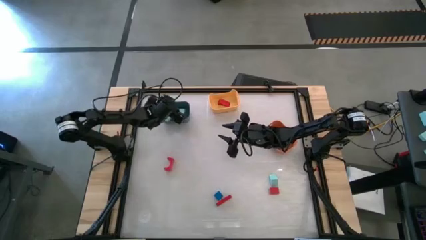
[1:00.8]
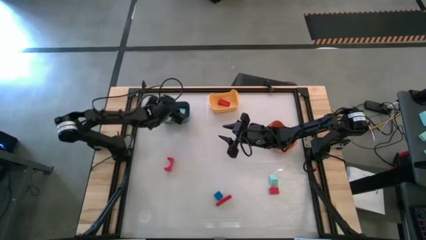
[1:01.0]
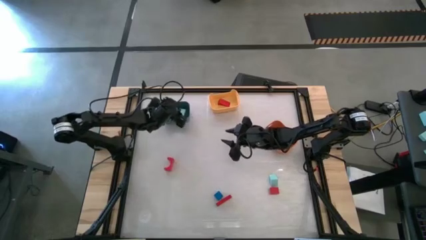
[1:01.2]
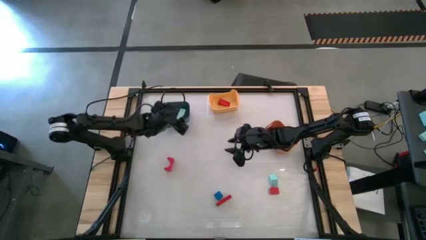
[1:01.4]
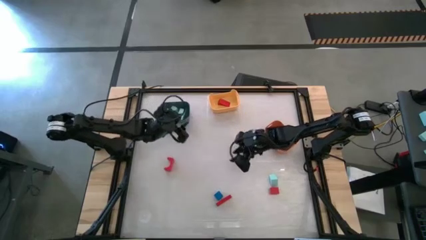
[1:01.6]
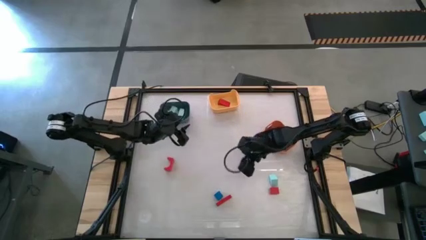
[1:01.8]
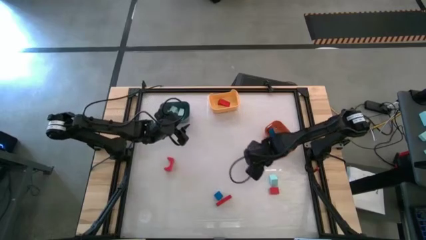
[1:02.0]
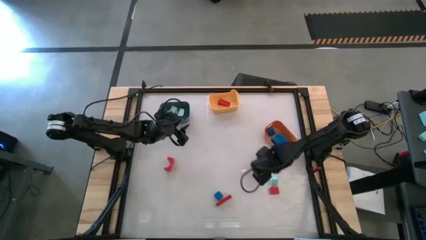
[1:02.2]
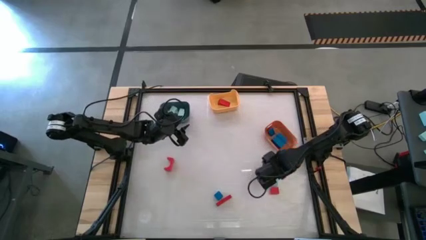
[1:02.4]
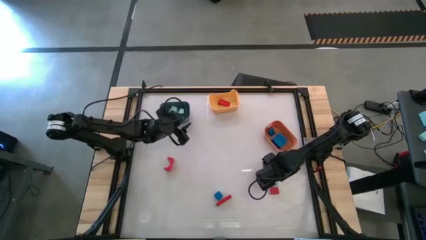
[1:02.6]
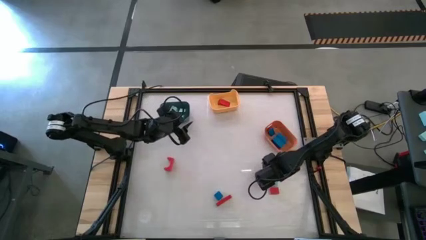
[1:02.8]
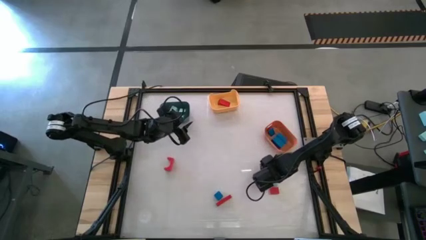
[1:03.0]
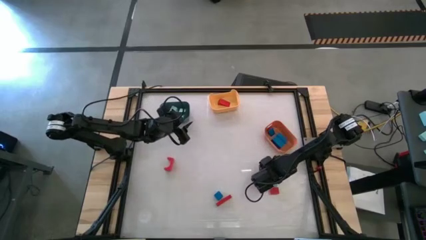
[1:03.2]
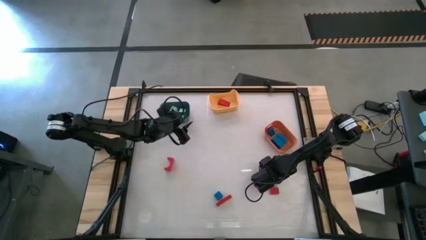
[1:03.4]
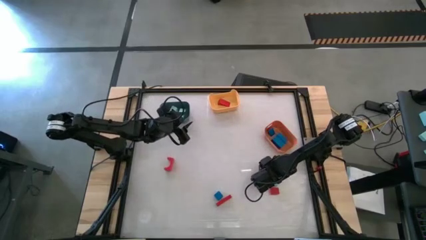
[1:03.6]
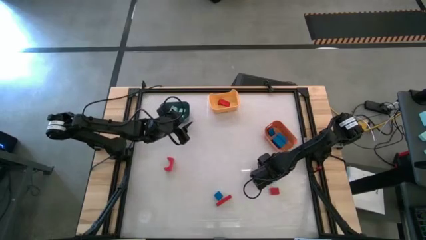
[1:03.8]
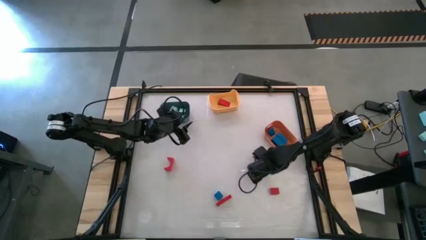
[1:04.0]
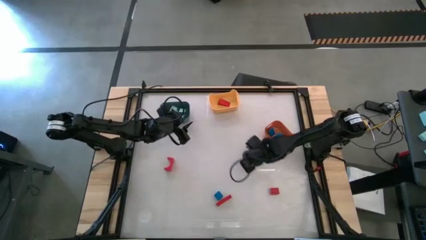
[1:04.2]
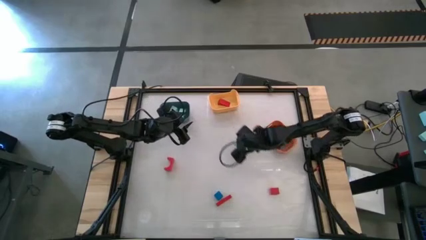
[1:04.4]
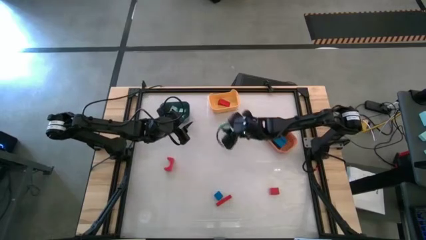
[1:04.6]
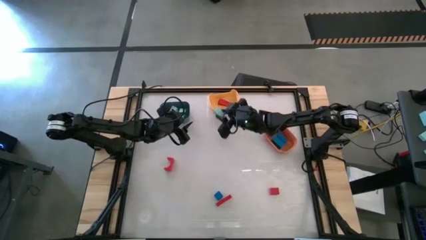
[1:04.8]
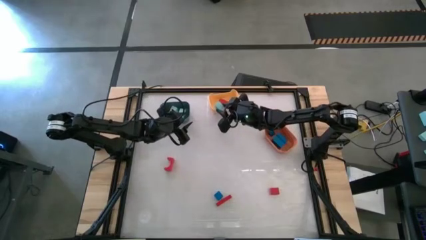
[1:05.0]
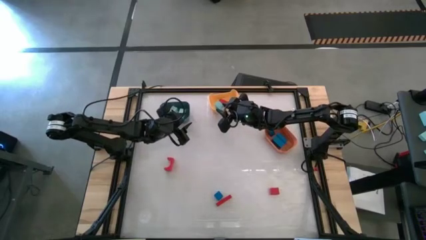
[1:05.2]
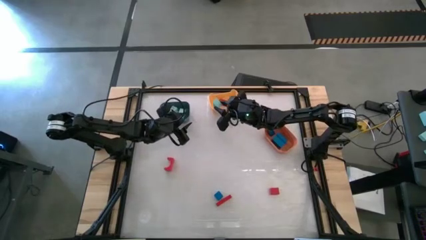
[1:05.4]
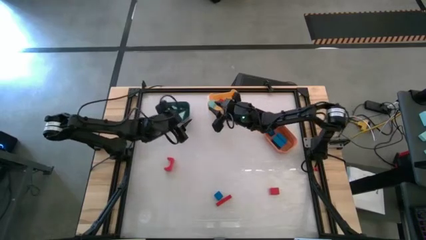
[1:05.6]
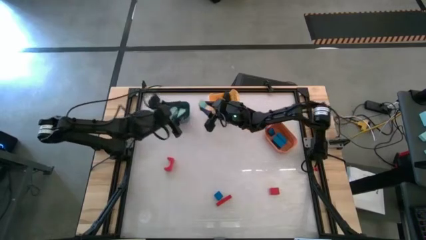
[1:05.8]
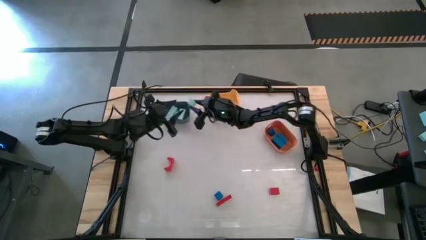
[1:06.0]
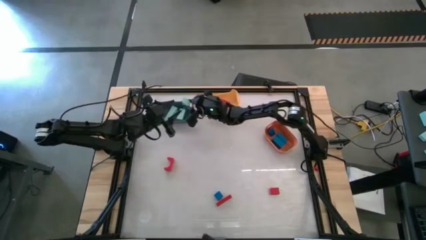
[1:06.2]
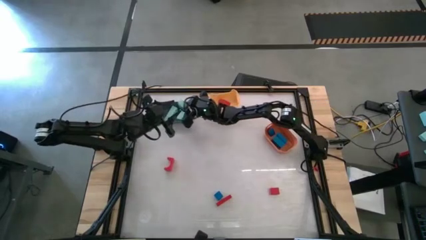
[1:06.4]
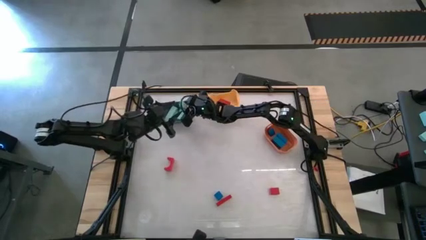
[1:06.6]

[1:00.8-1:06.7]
Task: Sort & place blocks by color
Put the light blue block into the blue bin

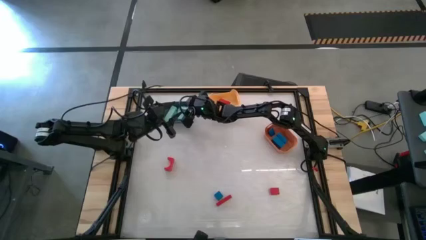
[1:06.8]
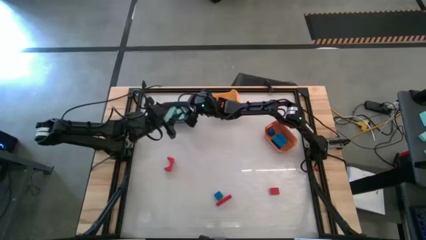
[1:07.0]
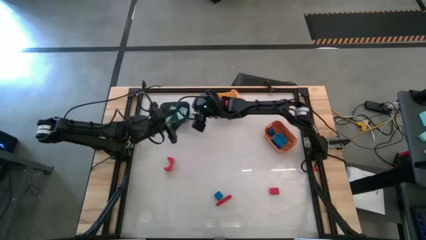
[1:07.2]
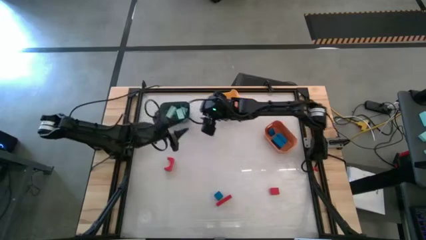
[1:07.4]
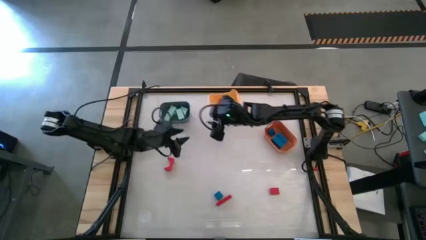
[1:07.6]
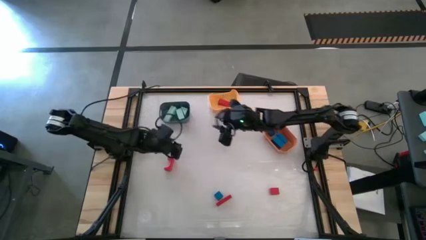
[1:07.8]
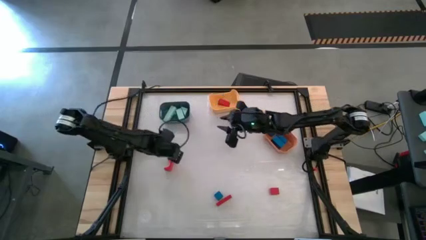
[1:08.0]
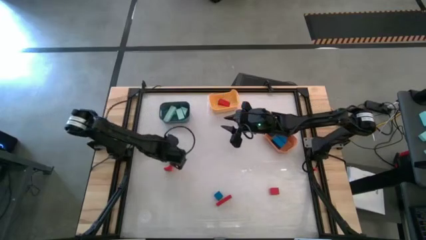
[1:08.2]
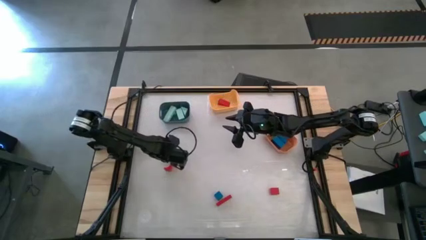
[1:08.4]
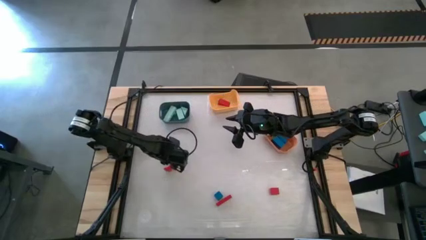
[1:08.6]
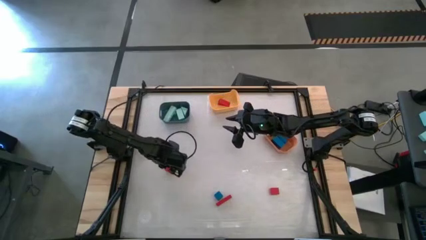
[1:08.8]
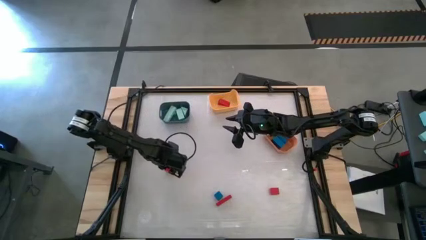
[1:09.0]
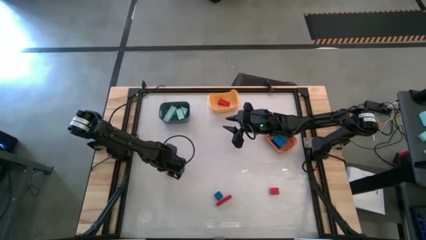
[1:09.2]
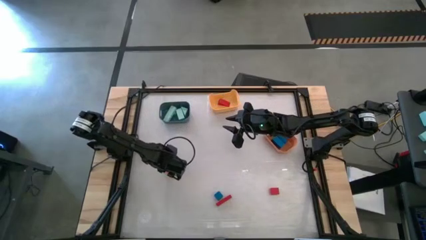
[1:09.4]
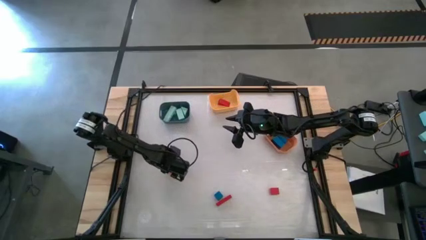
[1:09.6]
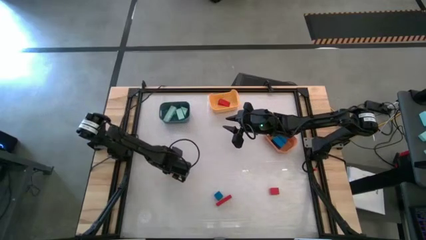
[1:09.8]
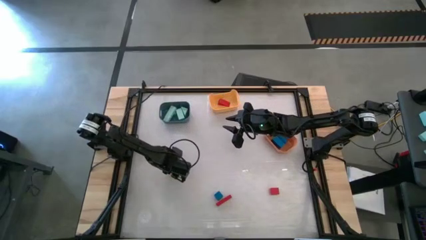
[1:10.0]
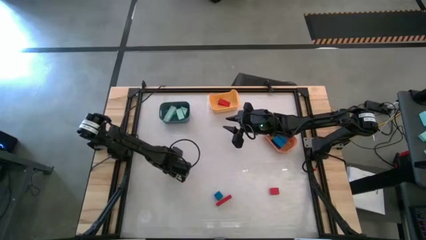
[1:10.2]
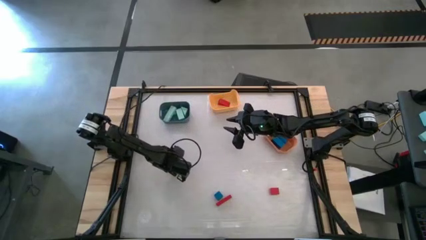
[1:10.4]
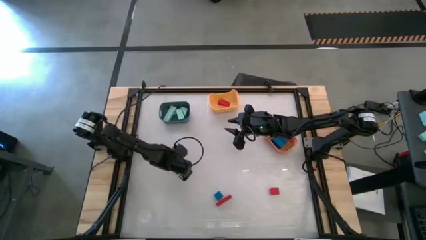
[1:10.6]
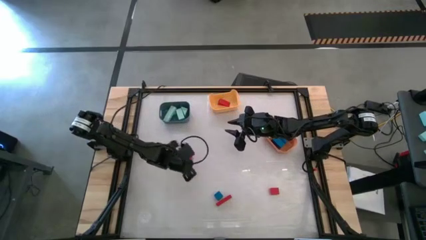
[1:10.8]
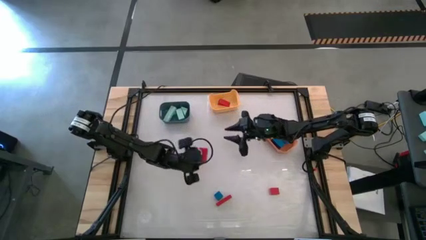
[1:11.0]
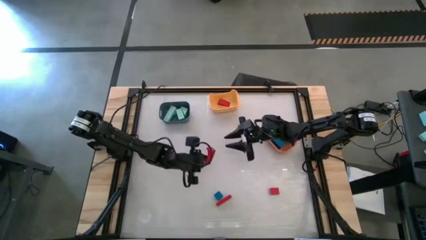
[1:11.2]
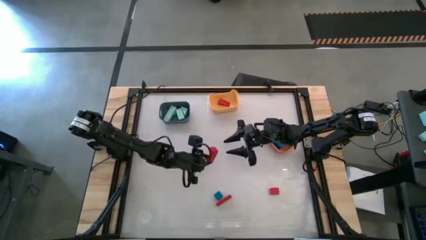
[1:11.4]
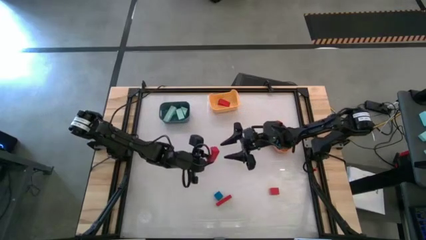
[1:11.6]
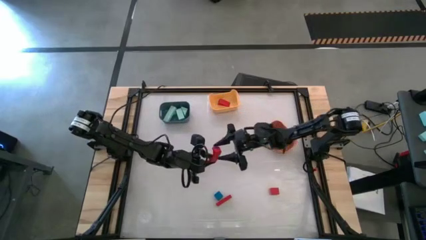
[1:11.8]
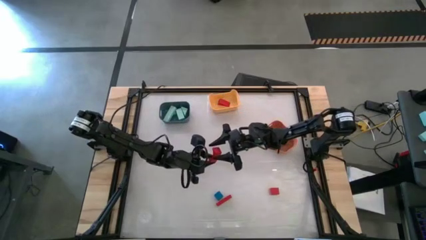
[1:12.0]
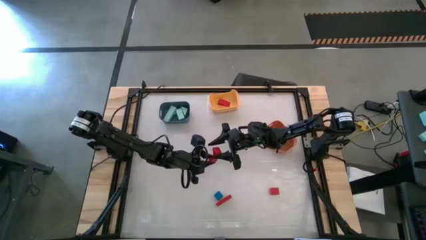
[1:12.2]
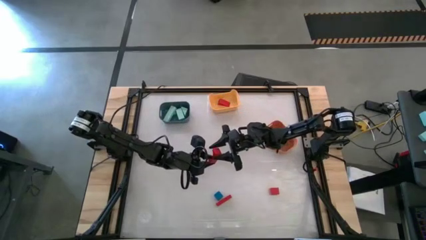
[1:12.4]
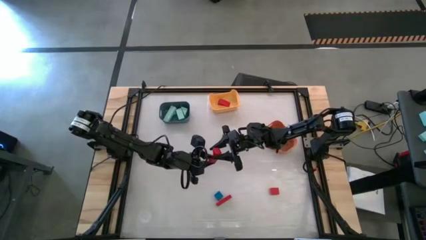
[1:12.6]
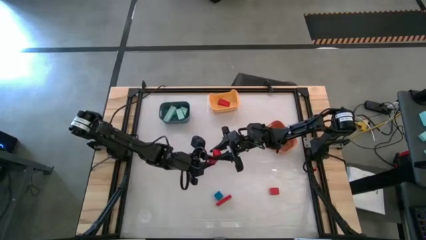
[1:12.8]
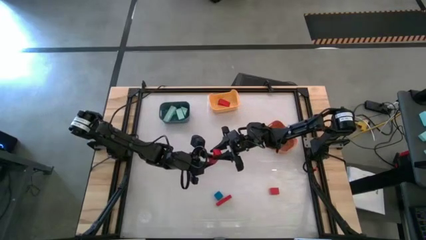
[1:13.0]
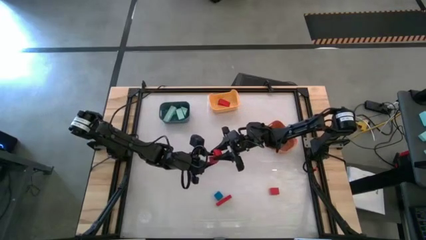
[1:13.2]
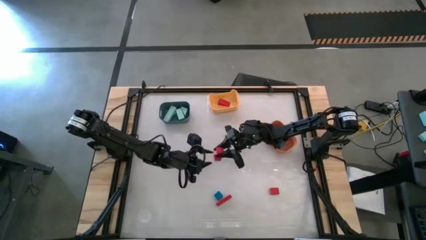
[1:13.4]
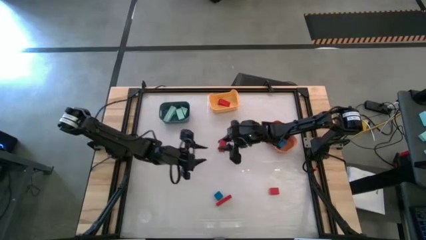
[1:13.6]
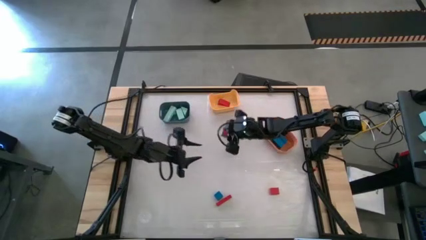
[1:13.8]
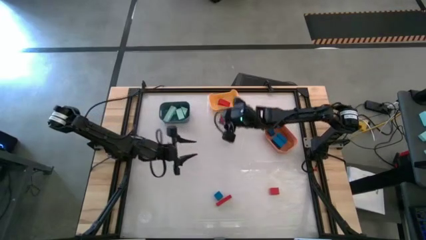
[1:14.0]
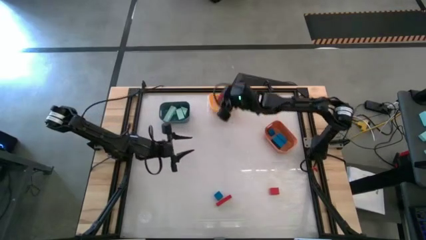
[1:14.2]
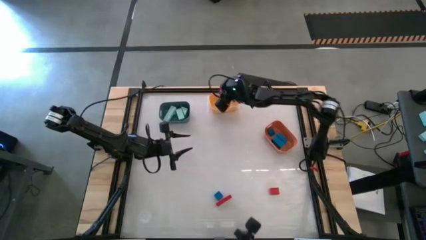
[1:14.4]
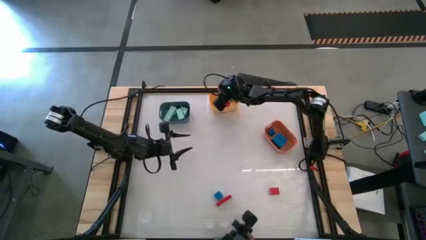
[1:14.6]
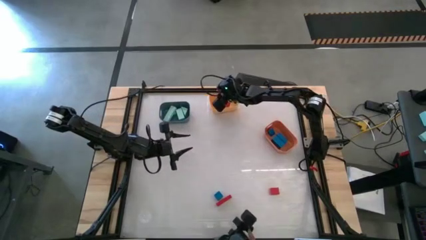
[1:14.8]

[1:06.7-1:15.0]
Put the orange block into the yellow bin

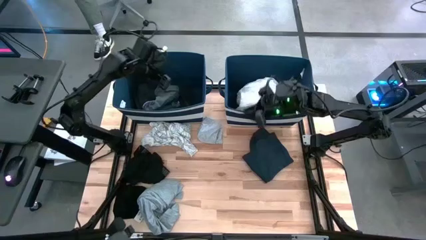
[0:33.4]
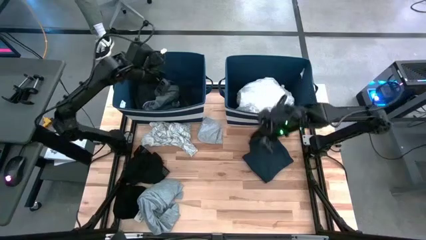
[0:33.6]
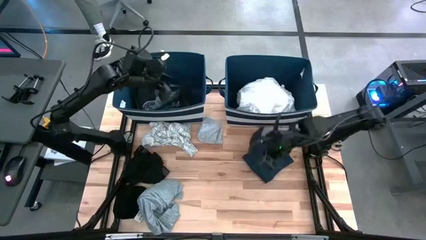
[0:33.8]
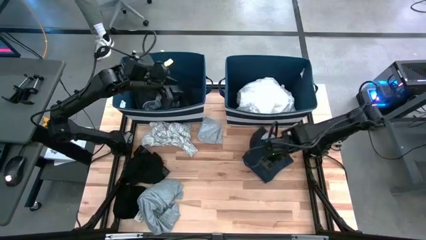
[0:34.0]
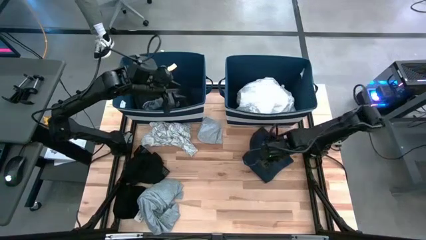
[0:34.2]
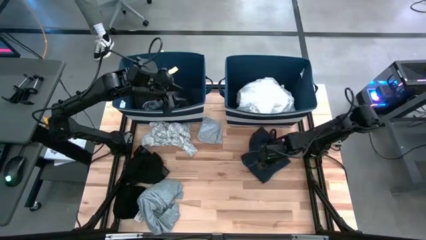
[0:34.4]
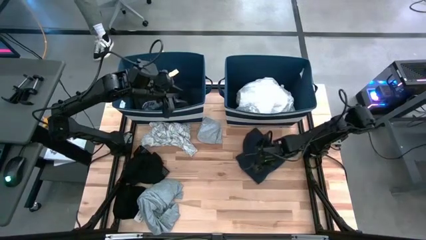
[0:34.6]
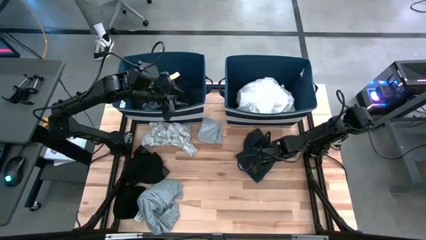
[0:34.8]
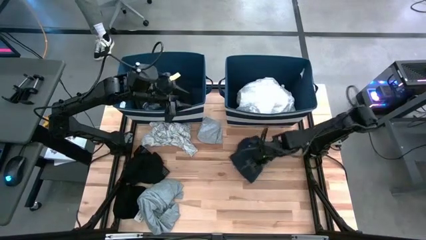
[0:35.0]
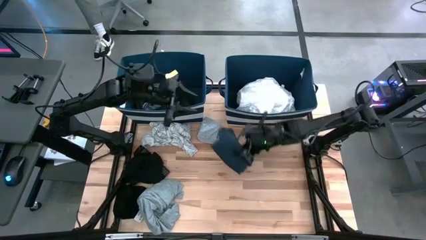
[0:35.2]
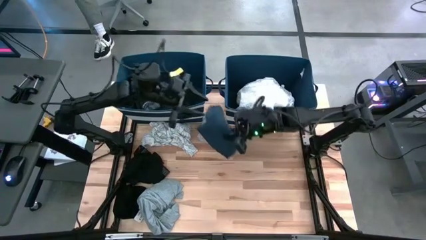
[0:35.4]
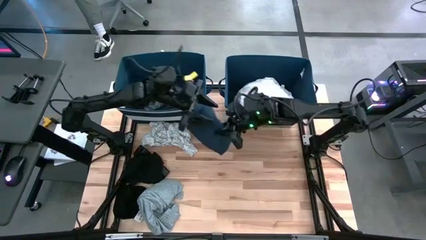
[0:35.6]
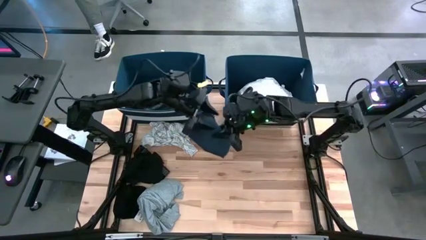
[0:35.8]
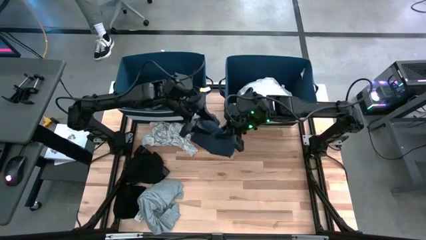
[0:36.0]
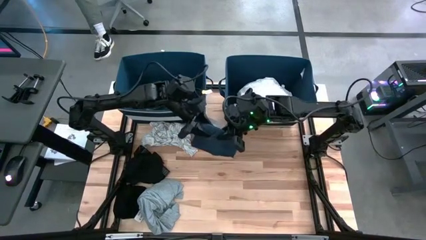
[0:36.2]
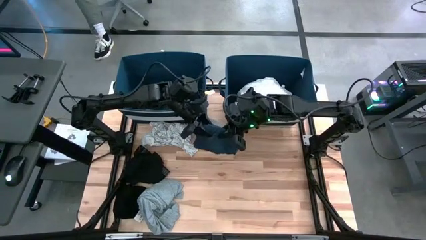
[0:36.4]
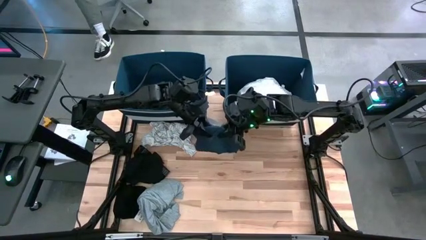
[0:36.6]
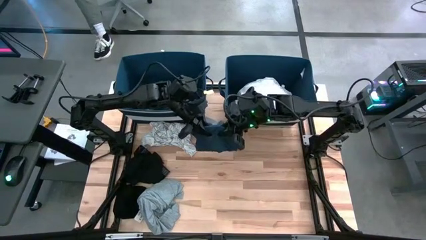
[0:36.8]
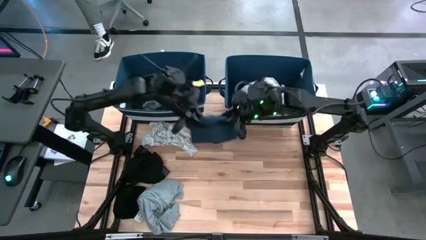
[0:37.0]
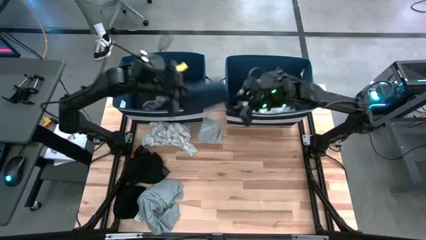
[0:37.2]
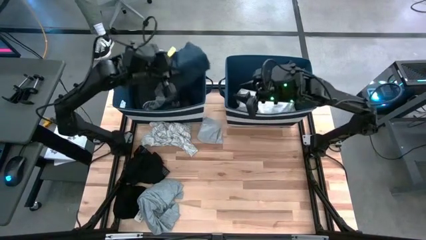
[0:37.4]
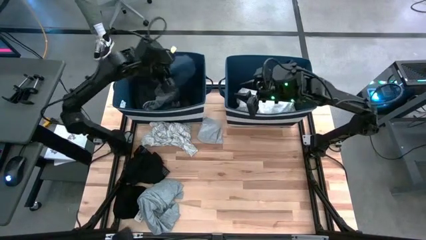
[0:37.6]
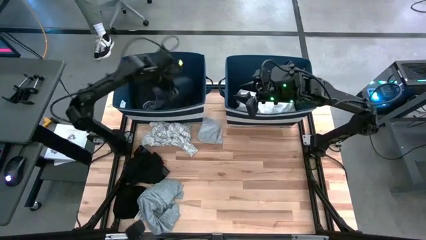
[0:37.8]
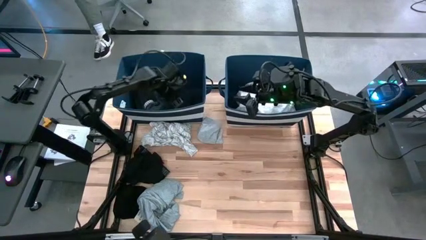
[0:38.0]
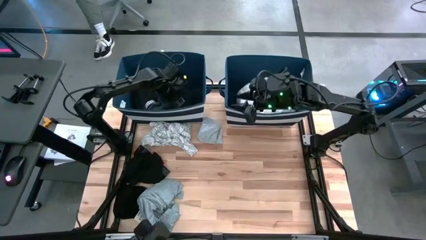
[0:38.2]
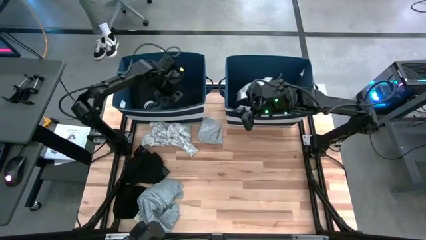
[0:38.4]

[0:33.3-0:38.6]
Task: Sort clothes
Put the dark blue shorts into the right blue laundry bin
